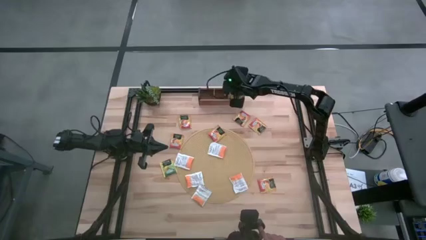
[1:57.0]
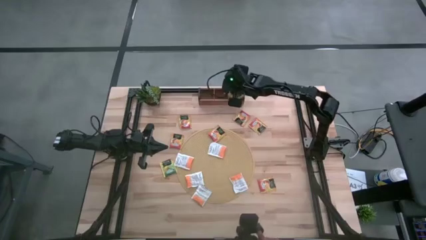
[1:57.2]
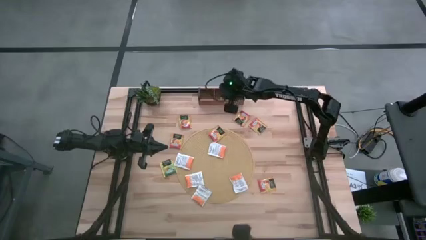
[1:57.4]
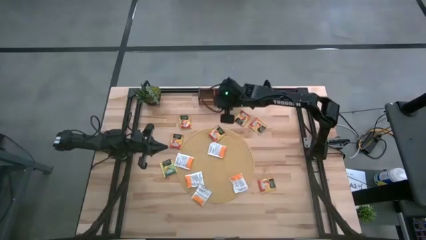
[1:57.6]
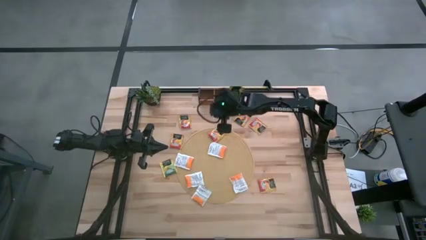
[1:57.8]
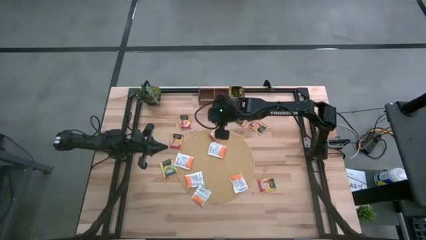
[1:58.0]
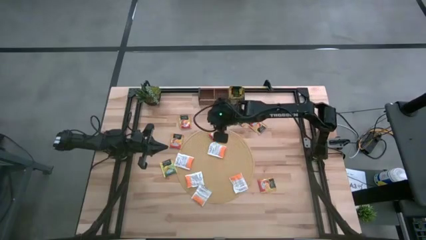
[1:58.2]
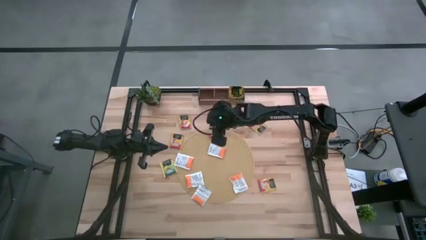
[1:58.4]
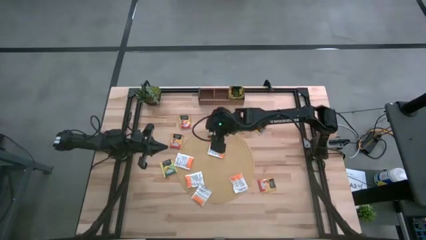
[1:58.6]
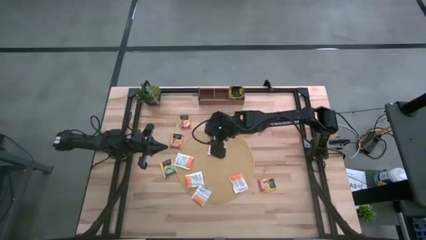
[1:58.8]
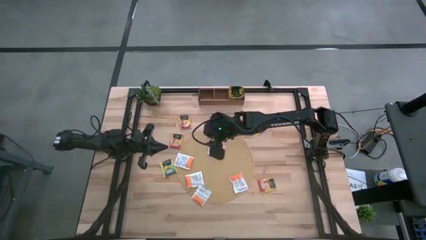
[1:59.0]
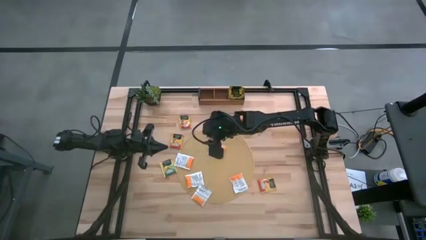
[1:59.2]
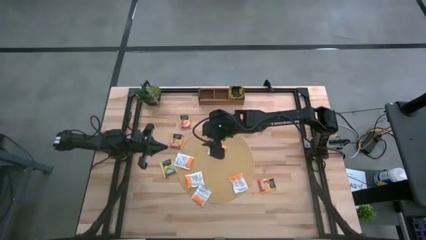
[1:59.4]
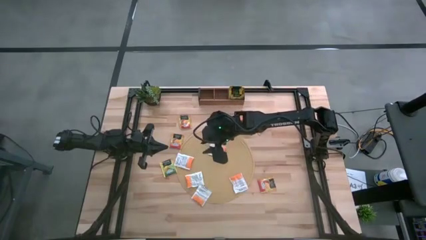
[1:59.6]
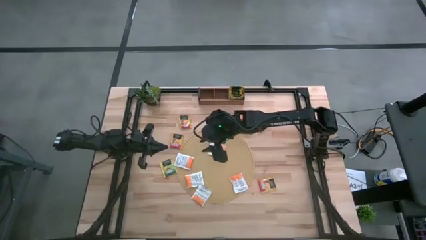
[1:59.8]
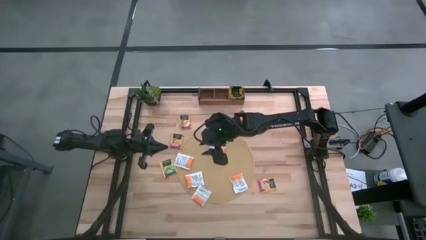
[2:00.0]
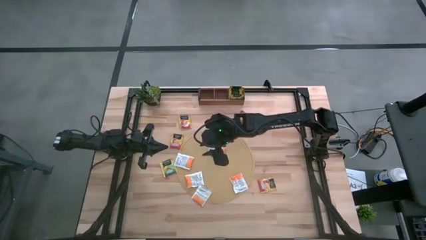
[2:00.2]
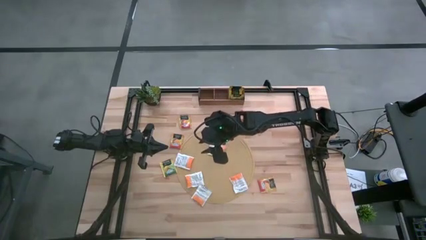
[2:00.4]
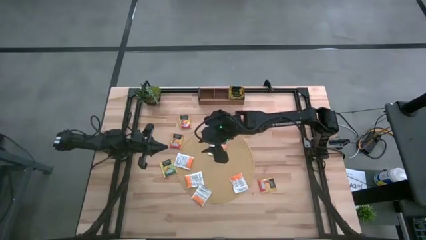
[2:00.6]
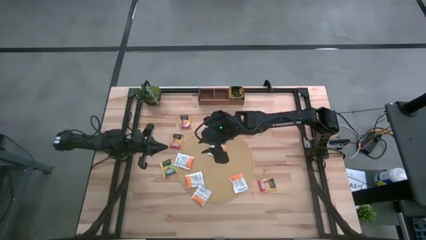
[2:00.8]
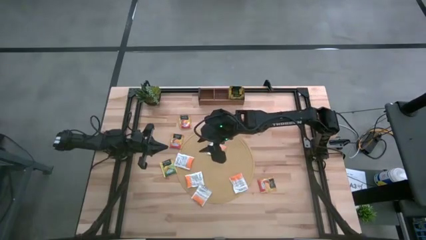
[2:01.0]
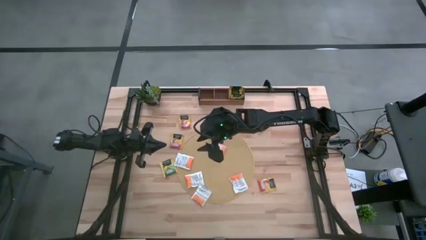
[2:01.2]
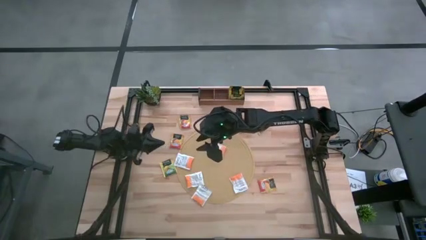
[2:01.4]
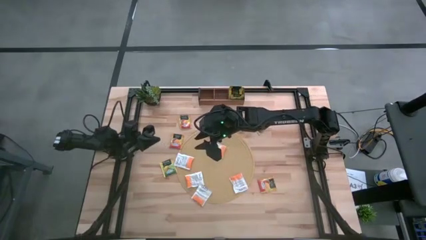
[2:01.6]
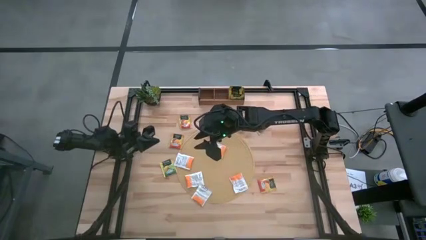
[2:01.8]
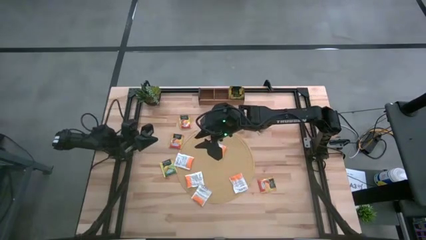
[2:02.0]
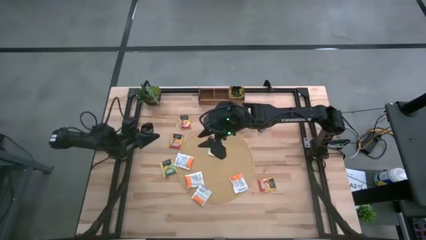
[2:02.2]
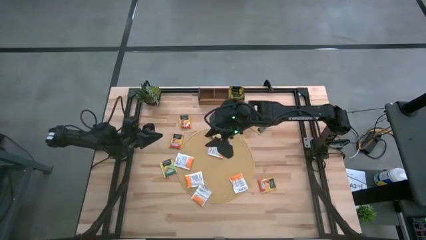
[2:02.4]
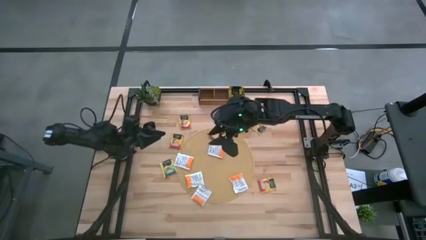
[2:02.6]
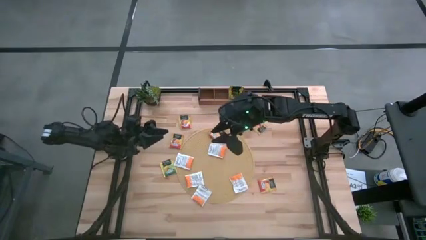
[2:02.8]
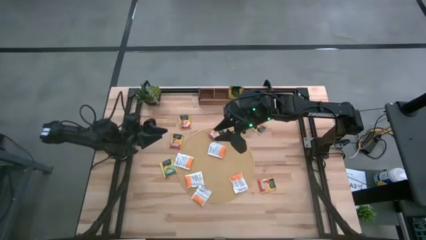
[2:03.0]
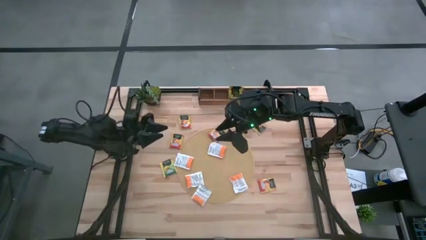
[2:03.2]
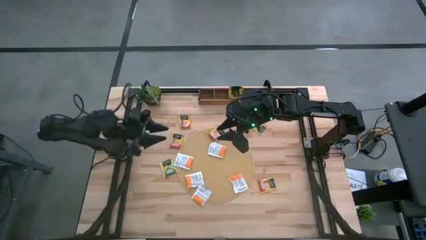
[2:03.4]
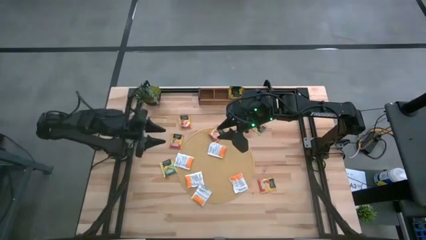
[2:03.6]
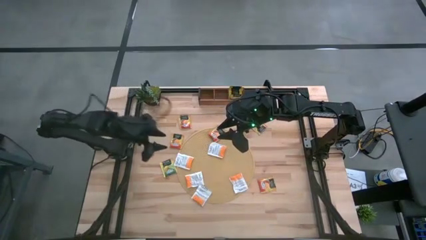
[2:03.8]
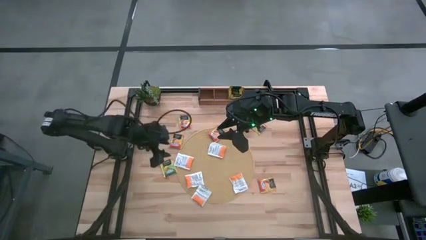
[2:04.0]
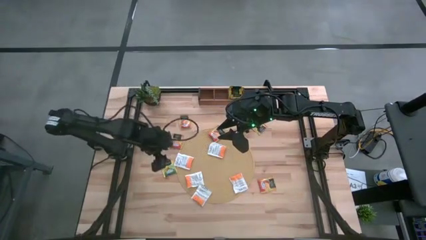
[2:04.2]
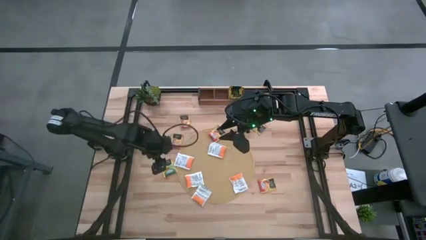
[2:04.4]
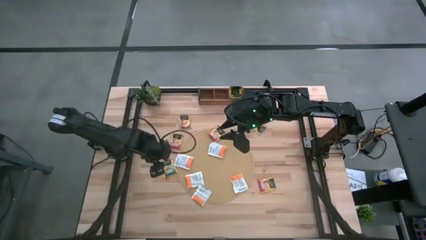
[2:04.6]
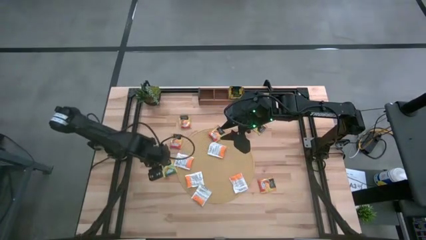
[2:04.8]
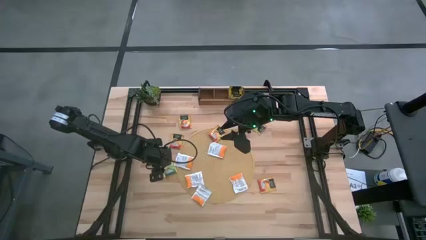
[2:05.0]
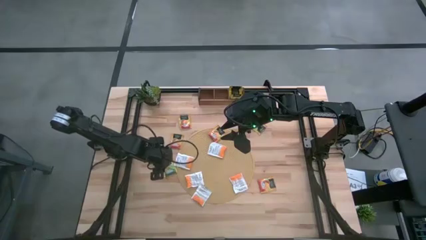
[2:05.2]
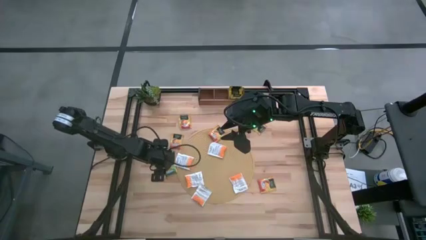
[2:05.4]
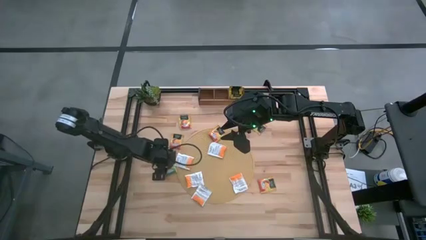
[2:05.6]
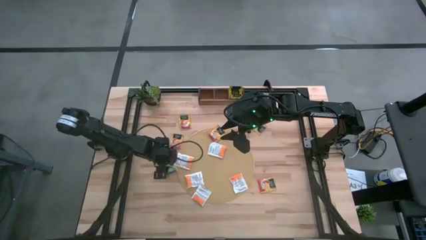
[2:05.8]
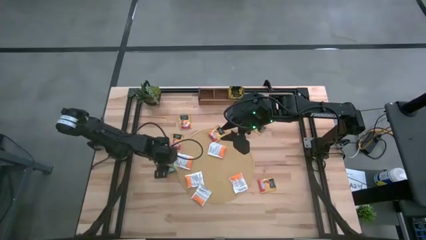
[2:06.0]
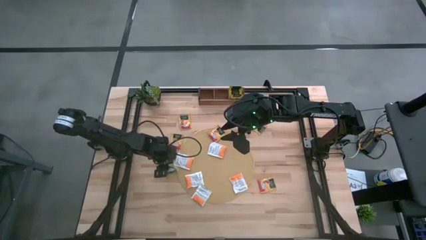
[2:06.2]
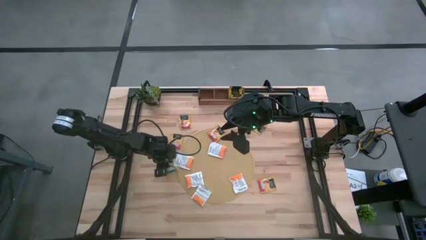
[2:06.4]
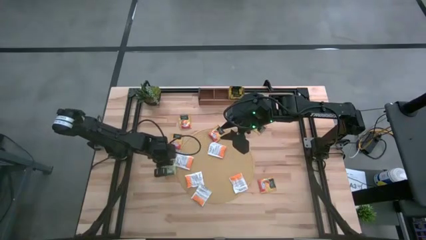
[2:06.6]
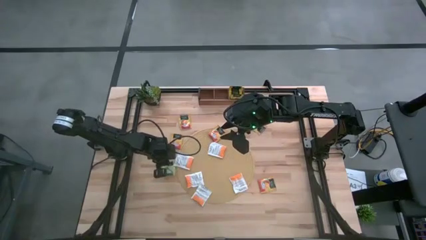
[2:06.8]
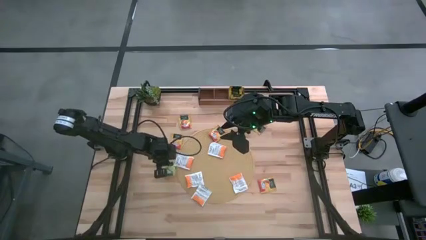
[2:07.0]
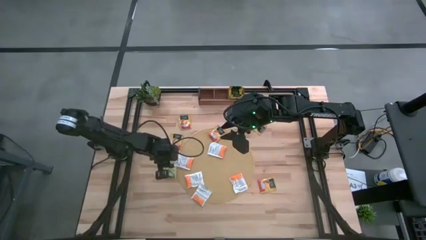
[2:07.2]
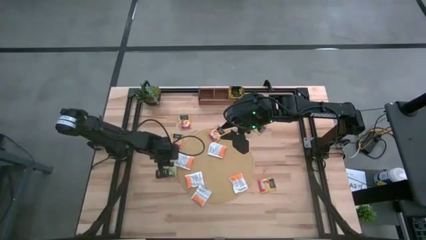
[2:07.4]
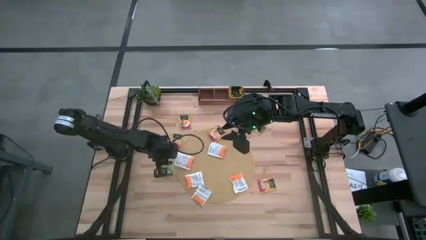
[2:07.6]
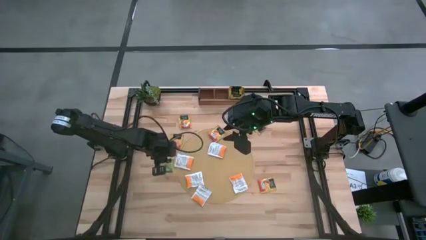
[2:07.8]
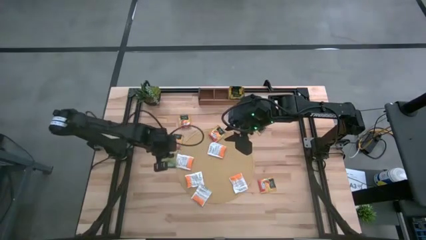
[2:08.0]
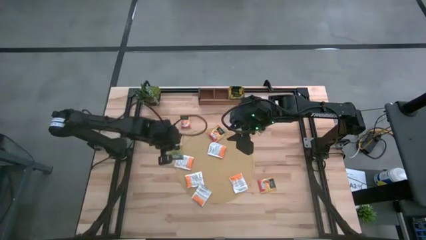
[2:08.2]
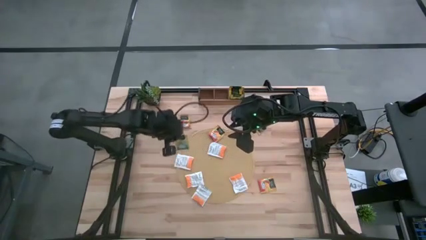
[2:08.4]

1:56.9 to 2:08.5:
Task: Pick & Place Tea
Put the yellow tea bag into the right section of the wooden organizer

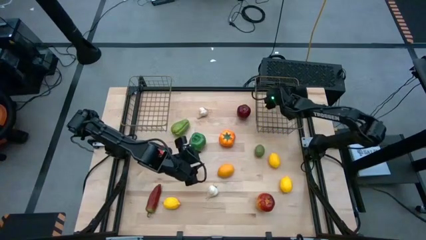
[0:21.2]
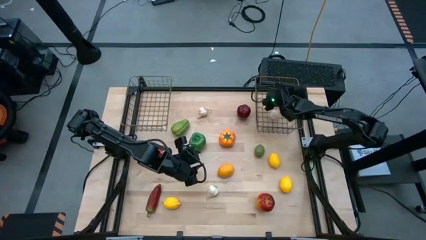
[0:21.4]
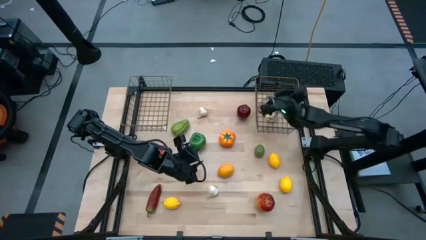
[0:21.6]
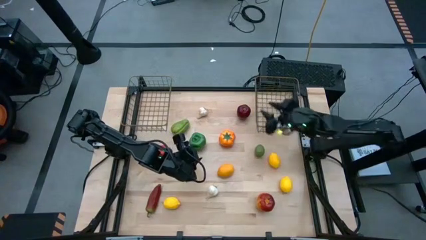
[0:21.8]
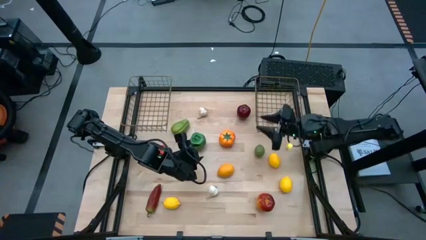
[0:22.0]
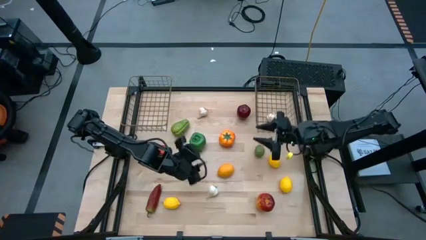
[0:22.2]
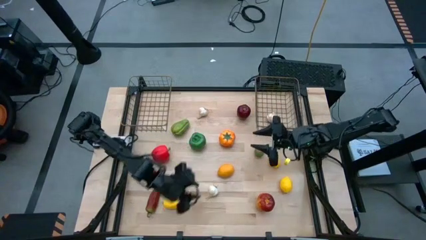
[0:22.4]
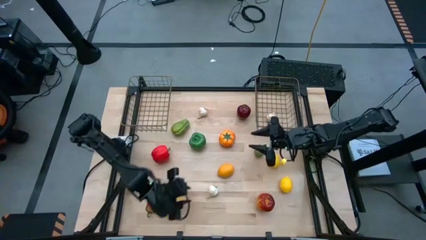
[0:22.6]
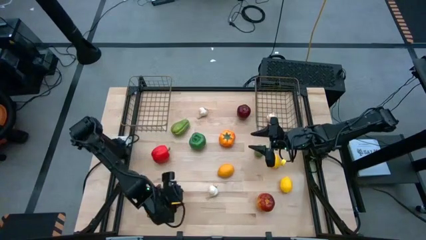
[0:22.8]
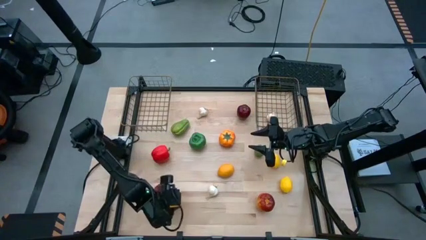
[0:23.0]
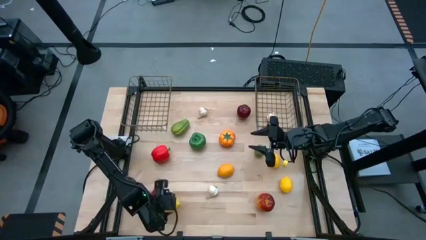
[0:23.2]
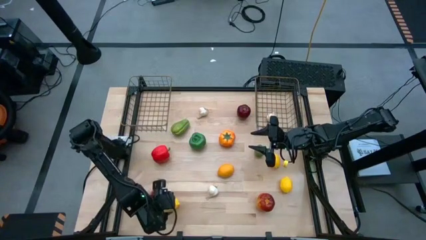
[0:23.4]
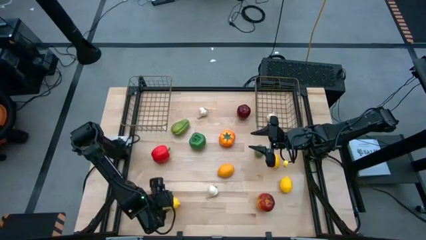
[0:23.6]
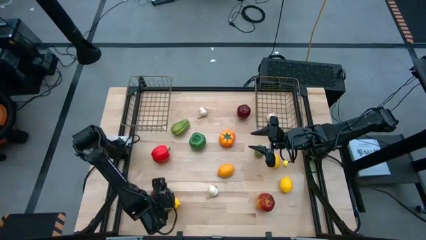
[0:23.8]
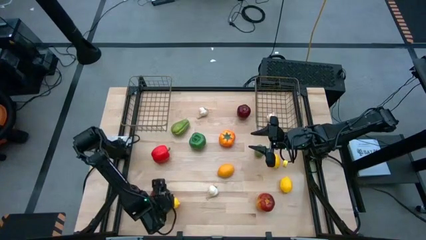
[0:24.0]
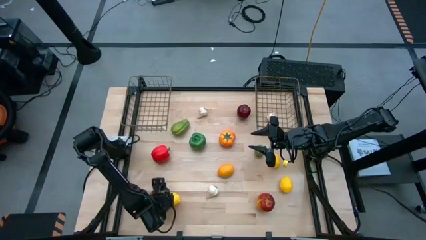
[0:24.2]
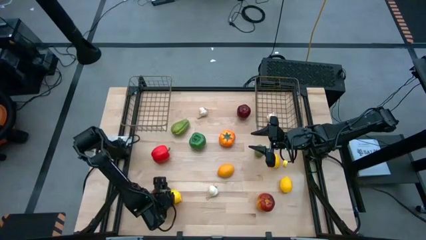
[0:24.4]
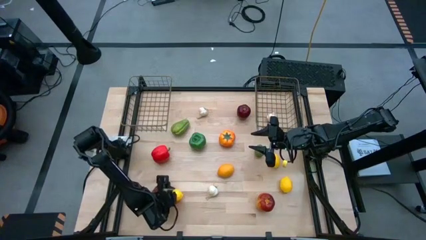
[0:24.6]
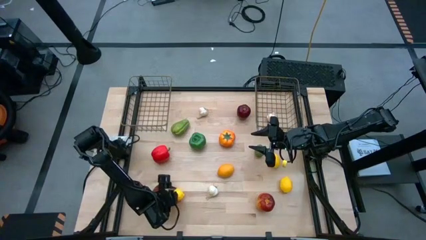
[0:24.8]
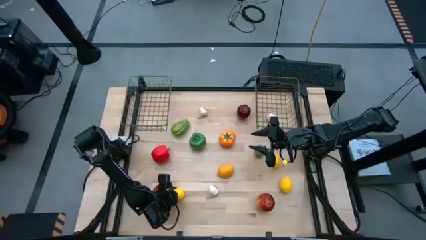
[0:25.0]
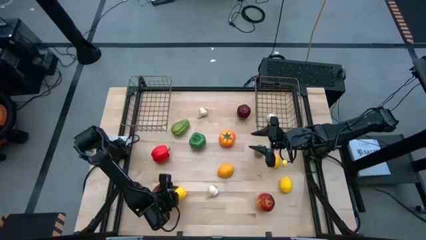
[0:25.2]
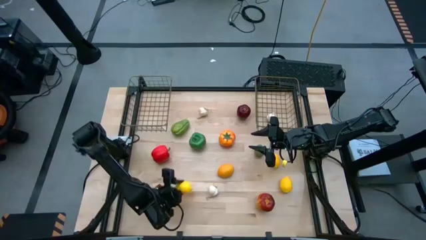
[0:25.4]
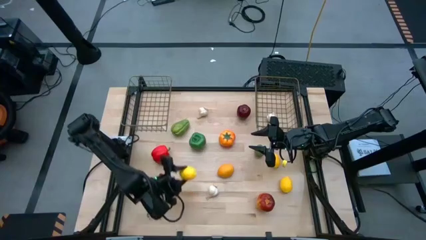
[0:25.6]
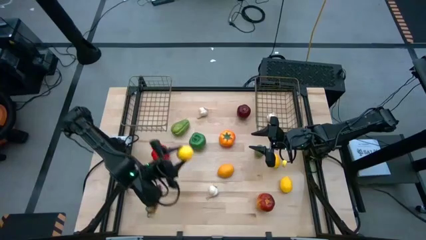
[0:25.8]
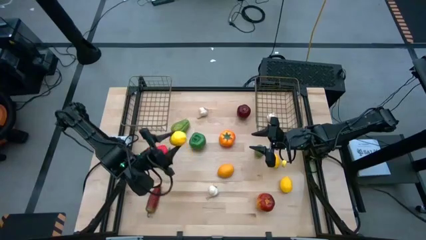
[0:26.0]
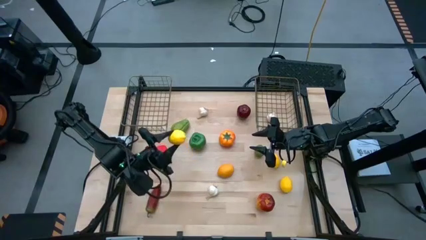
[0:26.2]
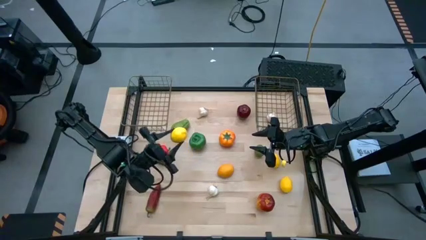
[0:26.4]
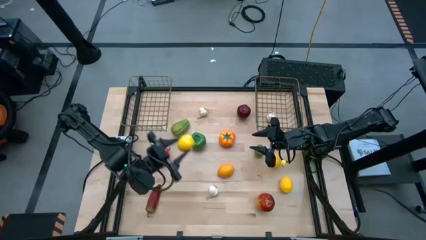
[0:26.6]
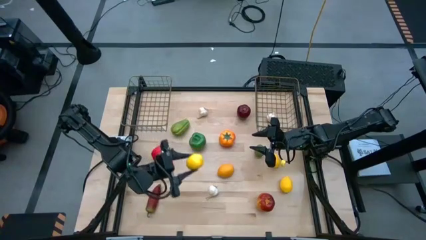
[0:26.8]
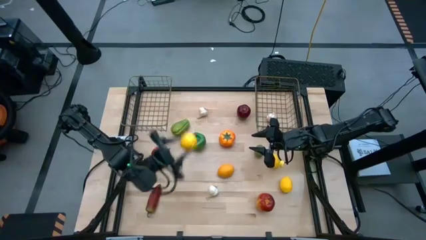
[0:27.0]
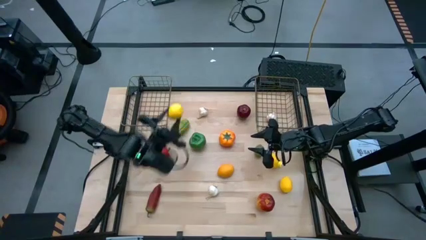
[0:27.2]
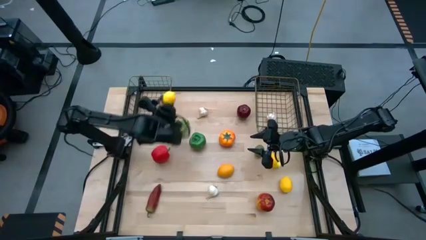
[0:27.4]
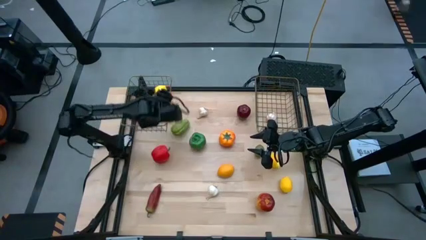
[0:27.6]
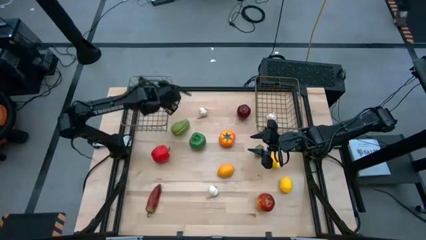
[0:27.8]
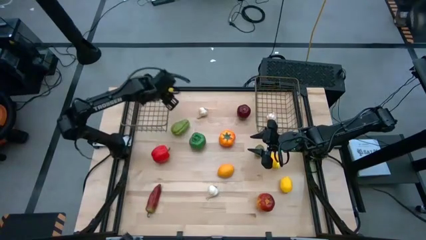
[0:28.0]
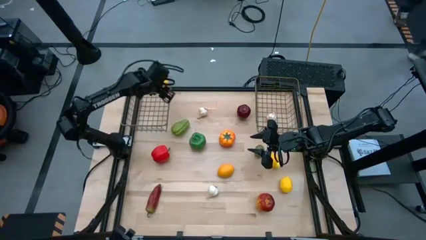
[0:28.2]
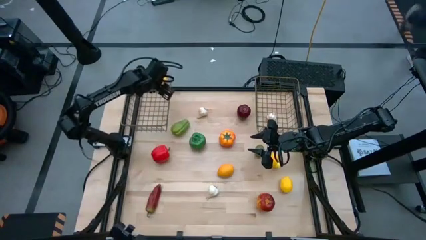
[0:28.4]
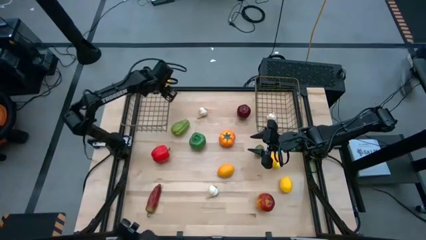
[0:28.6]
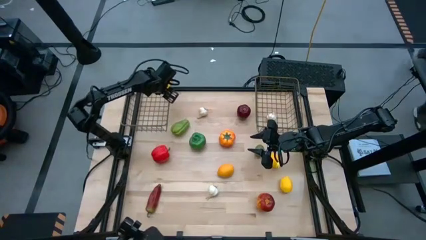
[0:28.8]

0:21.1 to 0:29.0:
Task: Sort produce into baskets
Put the bottom left lemon into the left wire basket
